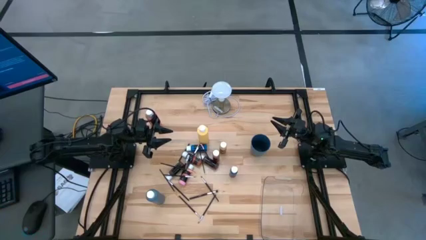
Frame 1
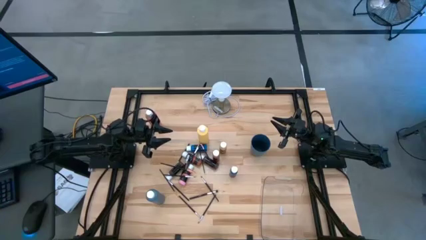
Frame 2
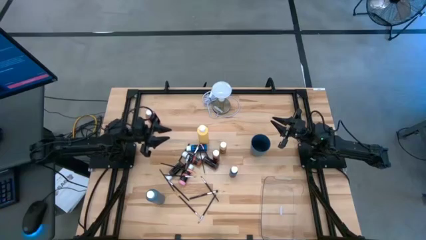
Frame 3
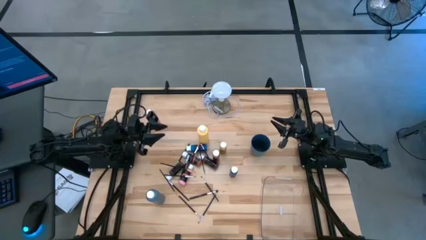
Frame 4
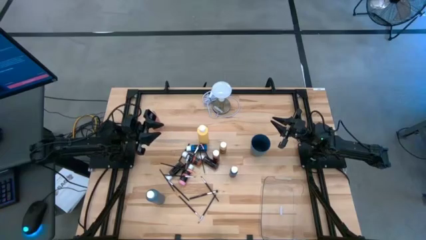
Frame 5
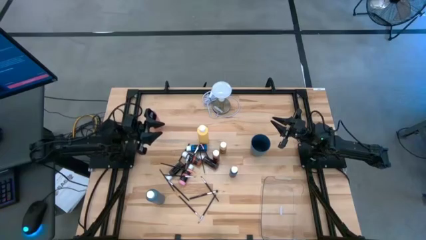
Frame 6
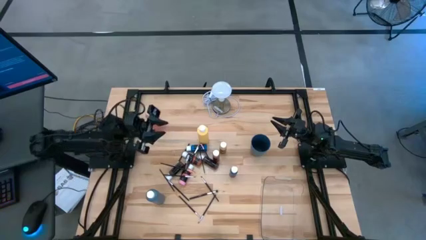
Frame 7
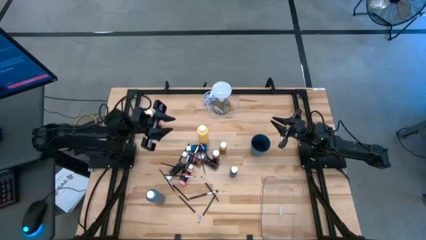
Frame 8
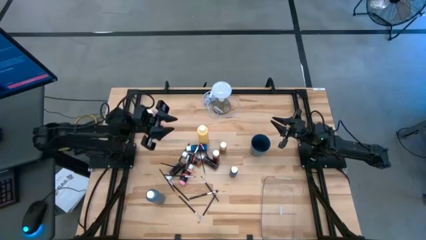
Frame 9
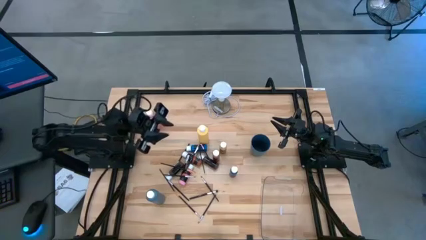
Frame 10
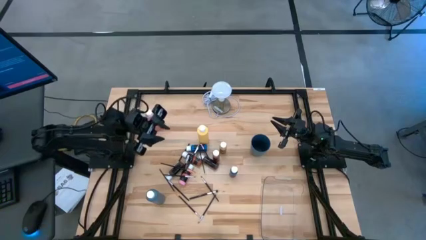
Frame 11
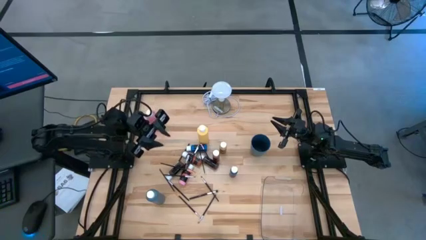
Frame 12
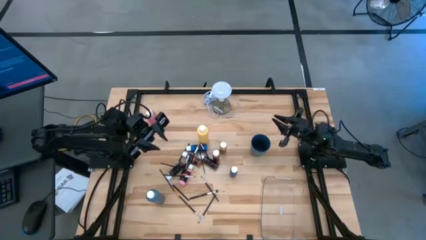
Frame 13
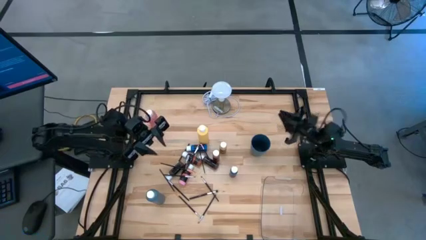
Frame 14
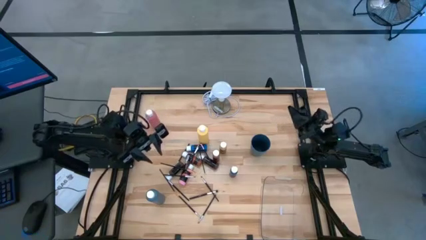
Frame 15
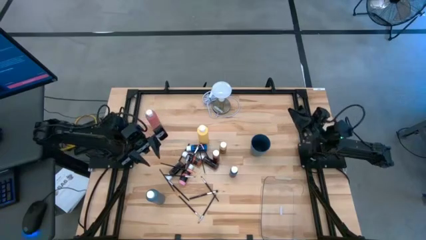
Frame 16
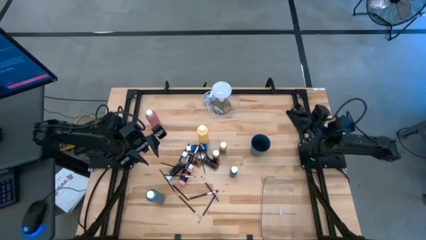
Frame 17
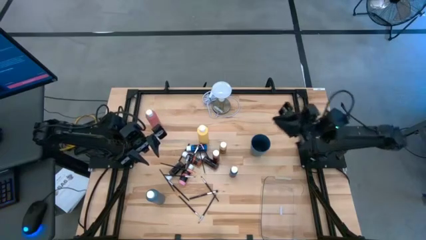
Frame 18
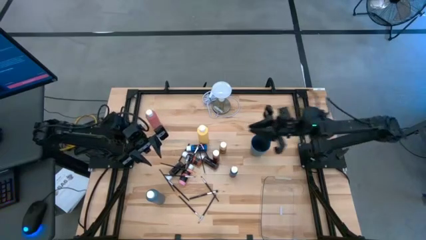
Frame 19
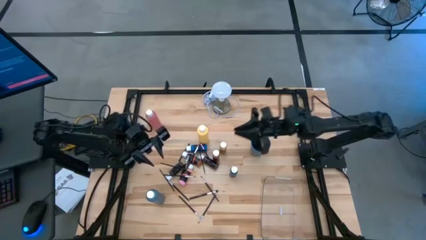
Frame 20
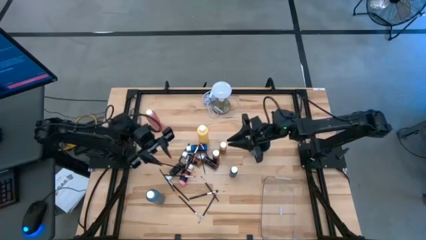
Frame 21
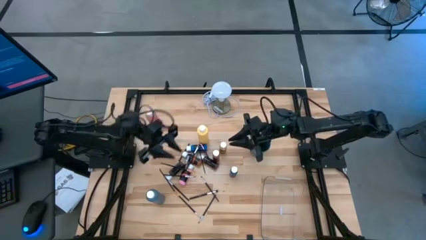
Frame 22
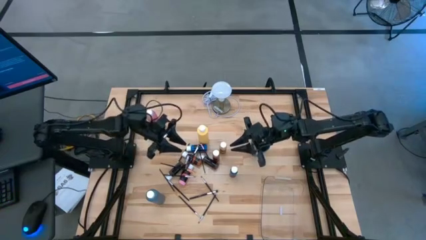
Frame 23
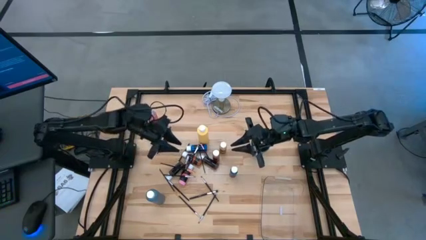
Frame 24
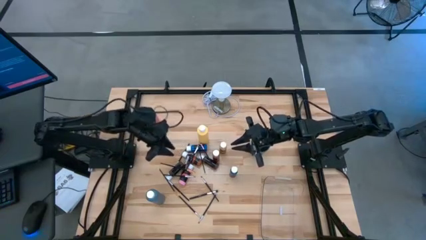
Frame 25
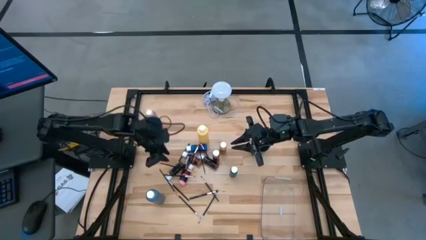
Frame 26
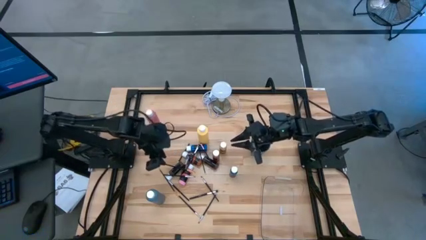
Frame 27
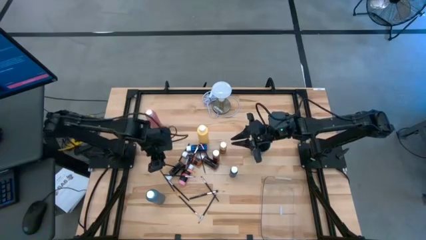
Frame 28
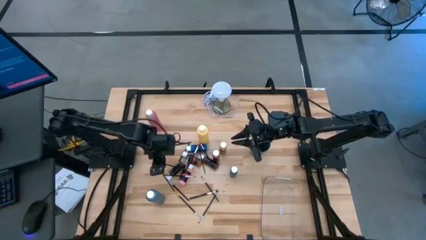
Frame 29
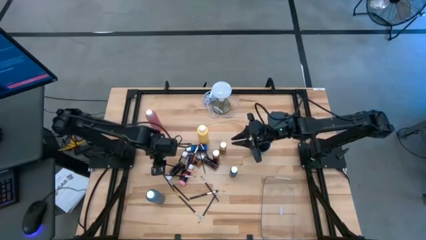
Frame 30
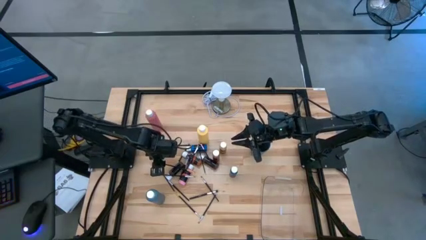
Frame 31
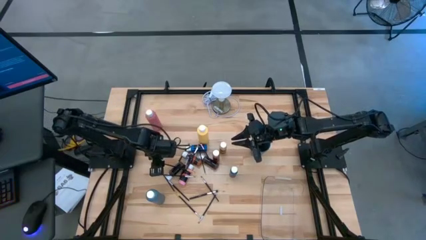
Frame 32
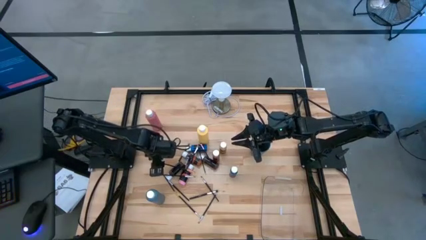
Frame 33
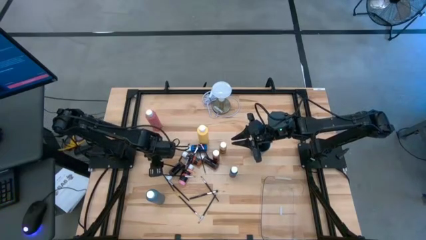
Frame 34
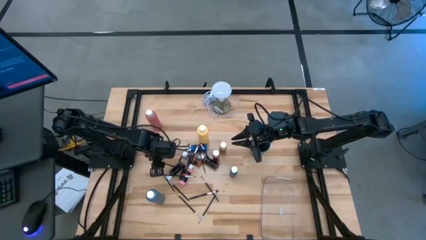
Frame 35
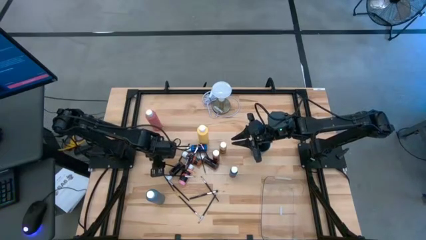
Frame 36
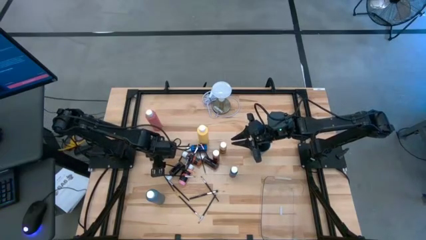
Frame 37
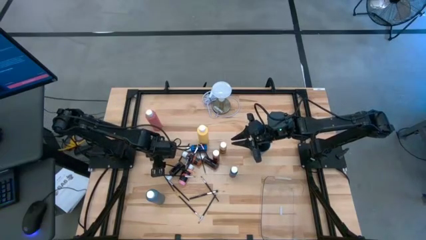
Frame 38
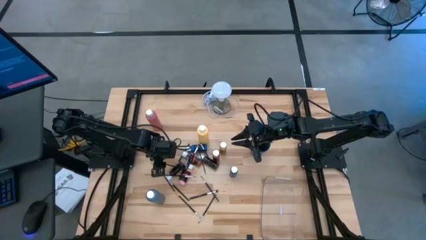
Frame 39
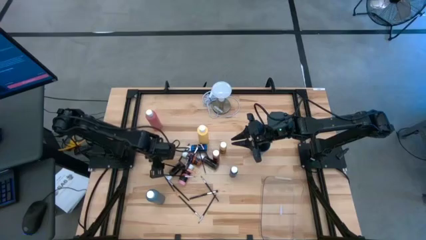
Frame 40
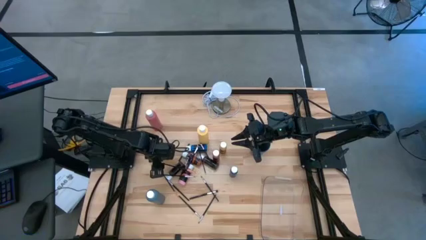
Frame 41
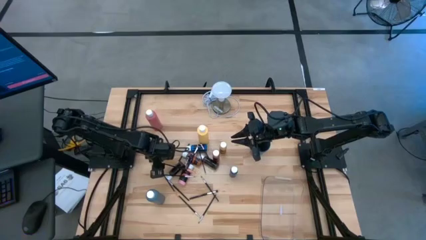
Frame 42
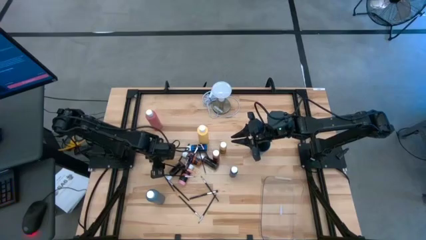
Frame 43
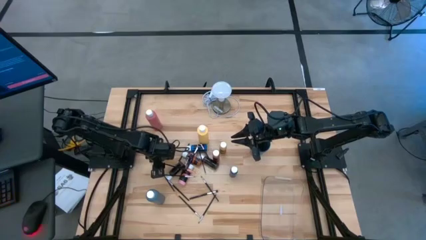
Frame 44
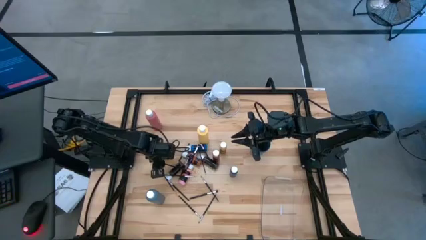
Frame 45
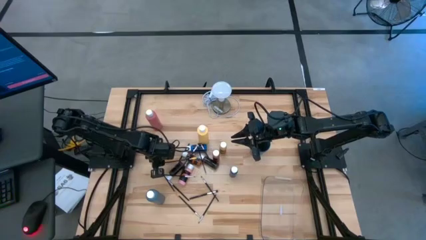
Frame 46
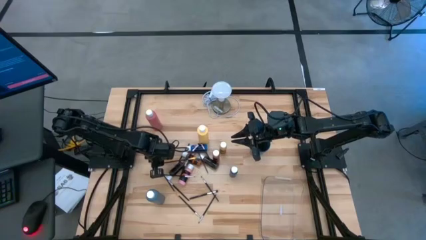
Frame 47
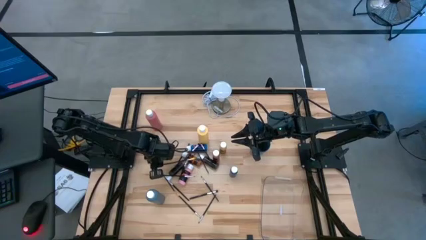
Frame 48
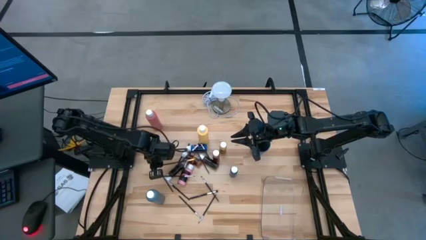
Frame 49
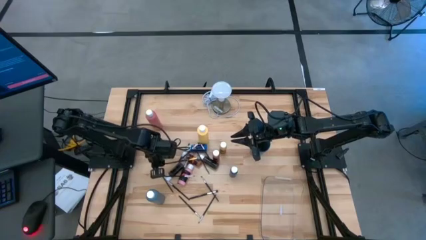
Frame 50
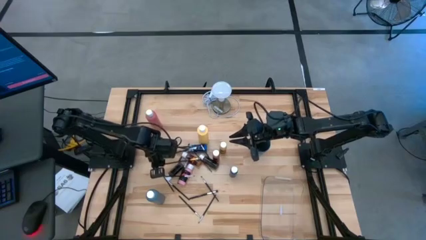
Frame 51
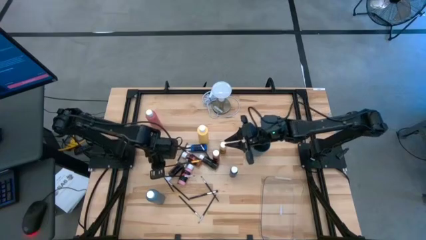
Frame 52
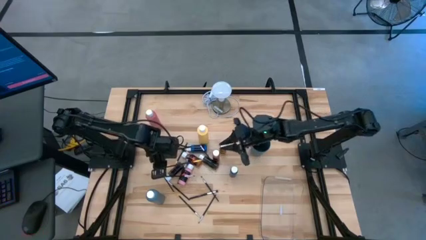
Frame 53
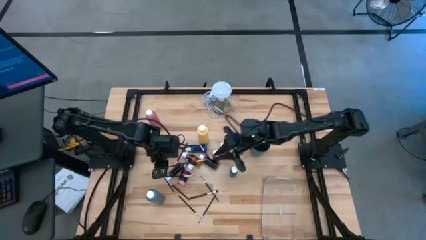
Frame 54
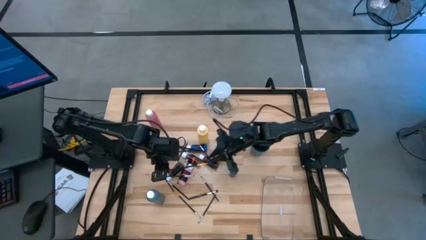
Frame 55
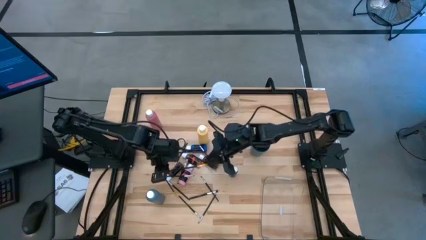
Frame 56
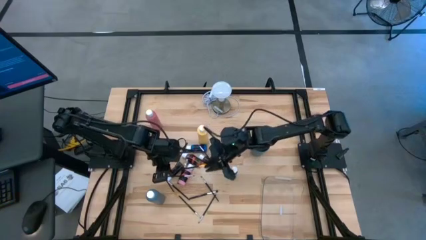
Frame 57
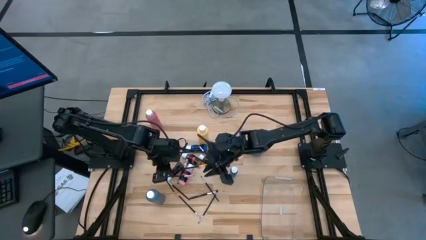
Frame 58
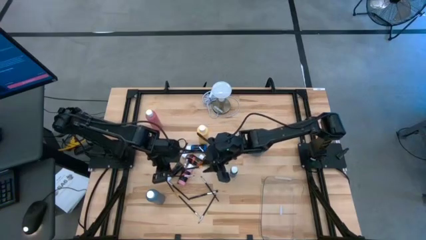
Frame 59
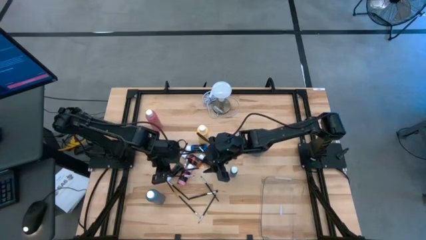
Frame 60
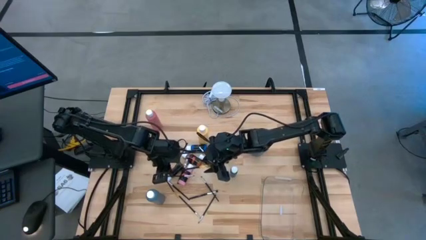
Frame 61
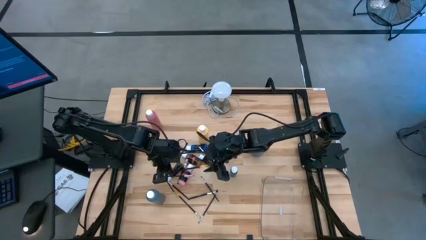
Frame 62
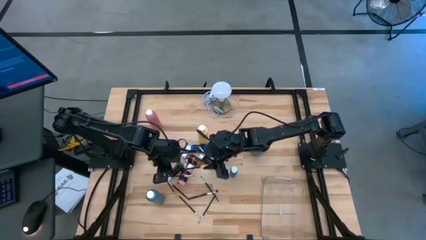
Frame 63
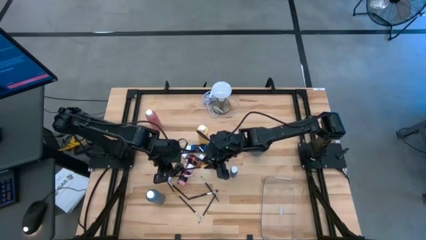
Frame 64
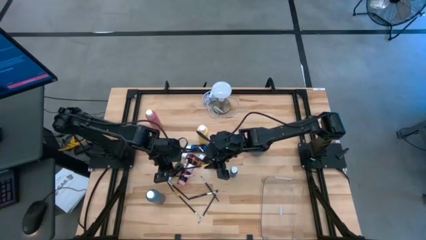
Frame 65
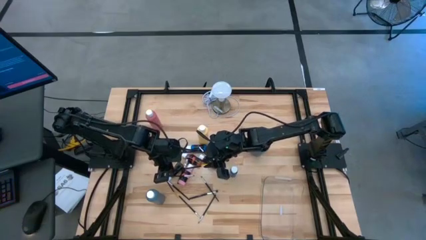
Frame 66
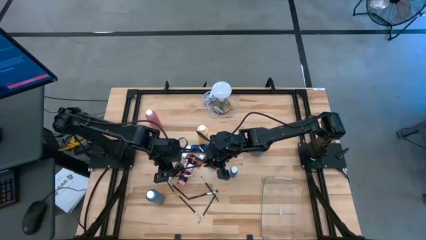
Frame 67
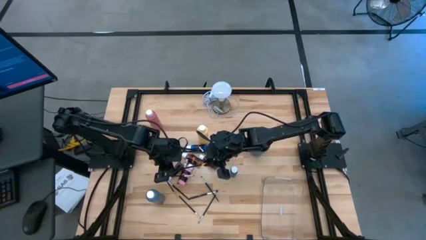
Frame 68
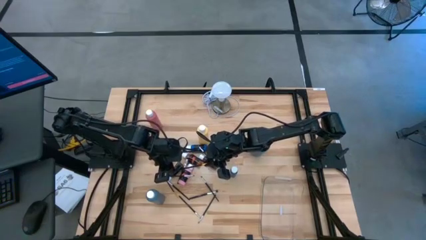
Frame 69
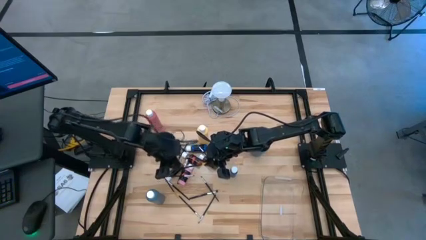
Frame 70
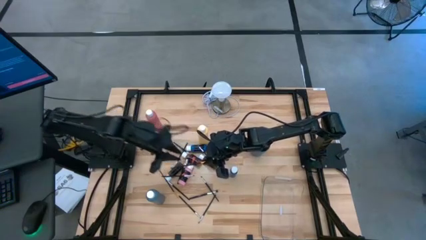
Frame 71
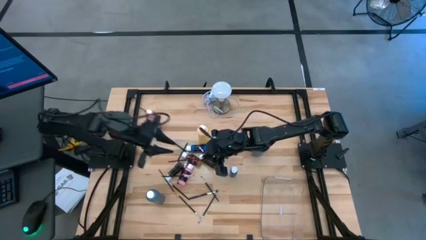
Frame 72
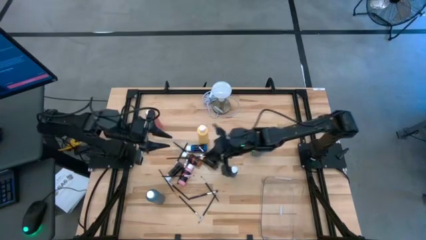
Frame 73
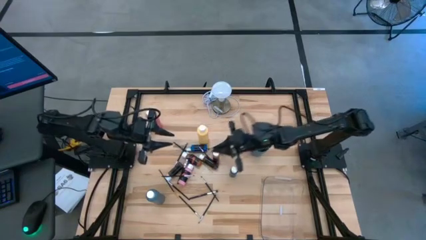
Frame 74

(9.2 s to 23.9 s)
Task: Pick & Place Paint Supplies
Put the top black gold paintbrush into the blue cup
